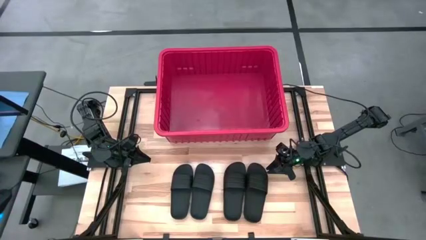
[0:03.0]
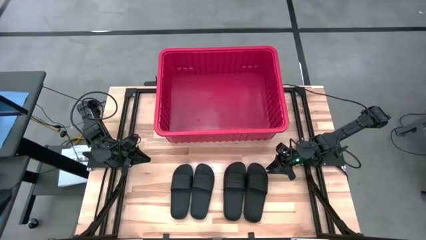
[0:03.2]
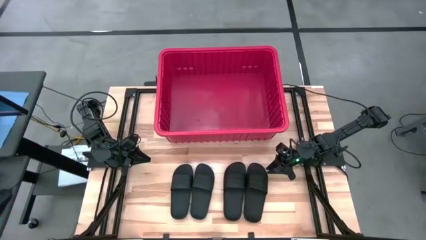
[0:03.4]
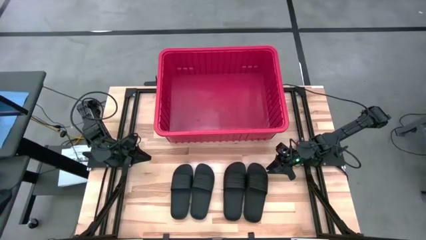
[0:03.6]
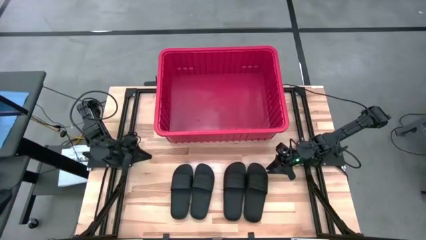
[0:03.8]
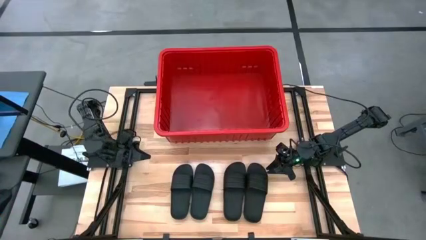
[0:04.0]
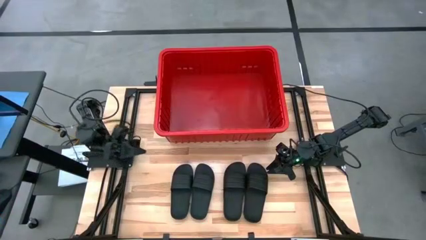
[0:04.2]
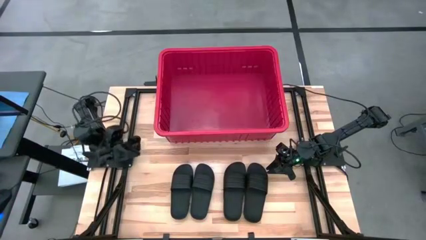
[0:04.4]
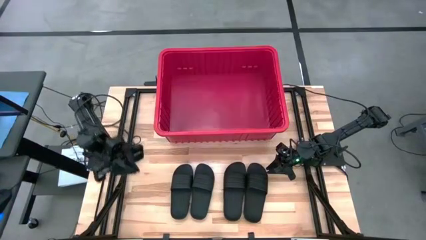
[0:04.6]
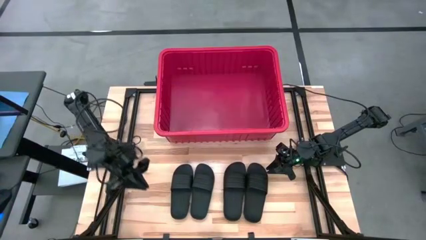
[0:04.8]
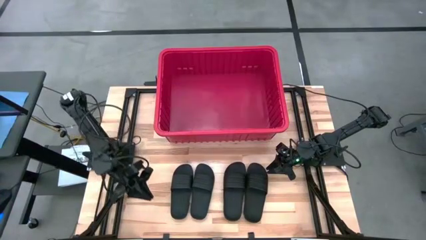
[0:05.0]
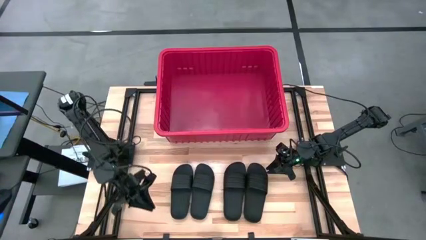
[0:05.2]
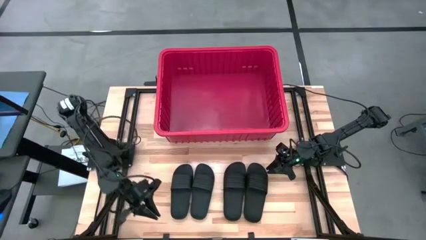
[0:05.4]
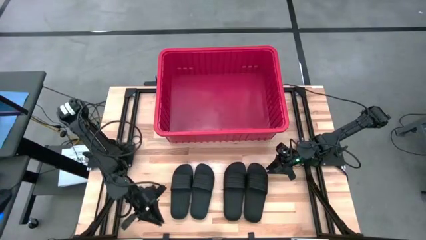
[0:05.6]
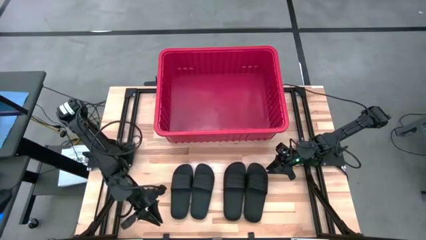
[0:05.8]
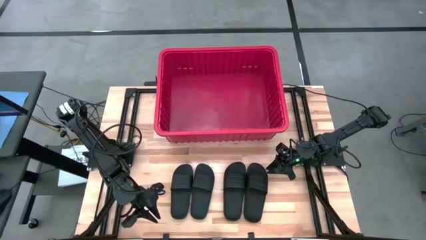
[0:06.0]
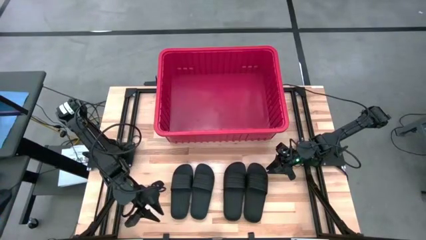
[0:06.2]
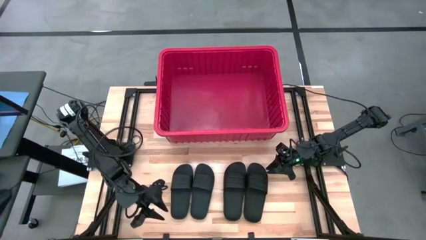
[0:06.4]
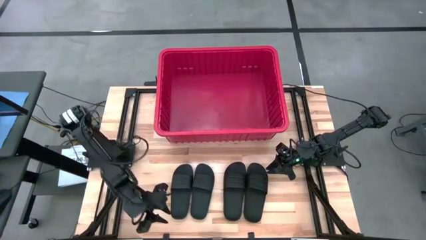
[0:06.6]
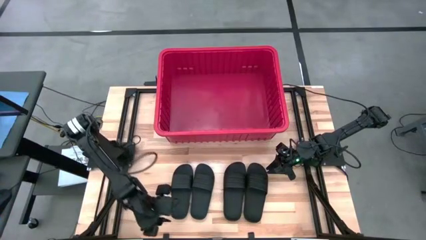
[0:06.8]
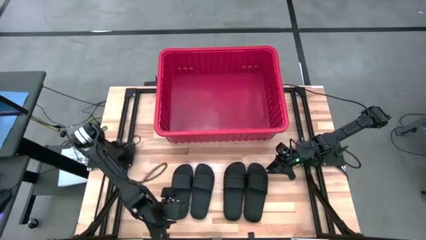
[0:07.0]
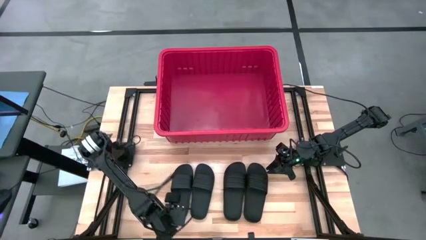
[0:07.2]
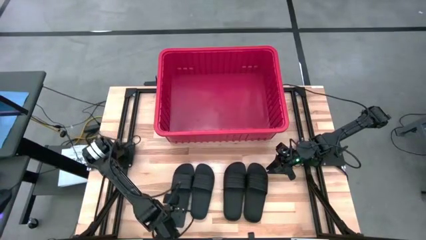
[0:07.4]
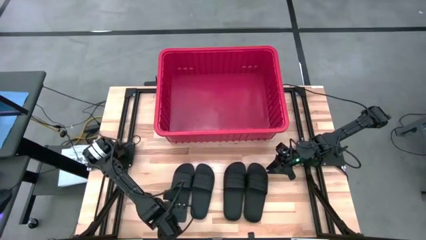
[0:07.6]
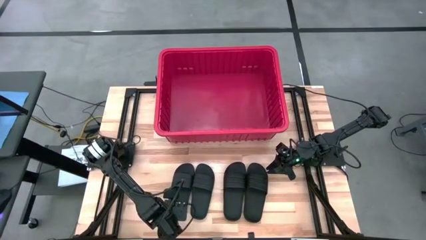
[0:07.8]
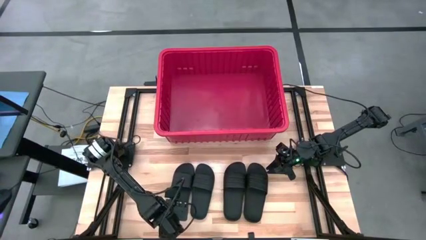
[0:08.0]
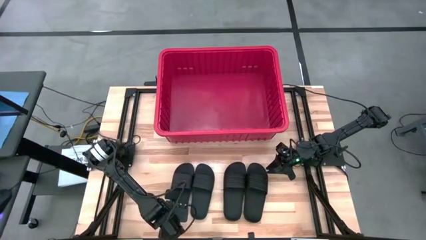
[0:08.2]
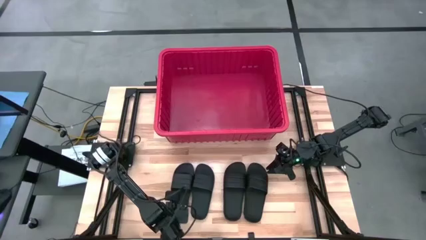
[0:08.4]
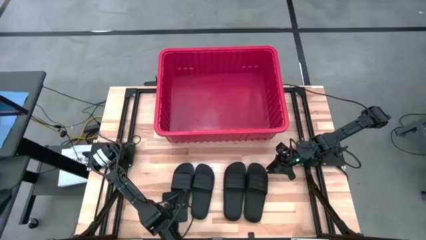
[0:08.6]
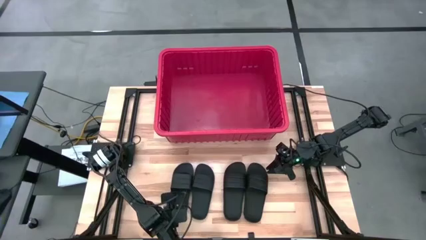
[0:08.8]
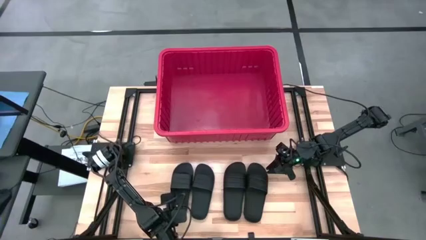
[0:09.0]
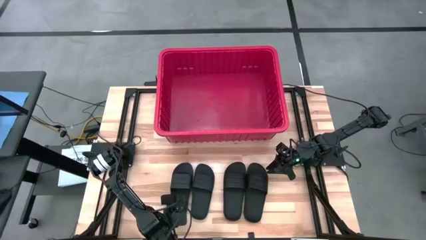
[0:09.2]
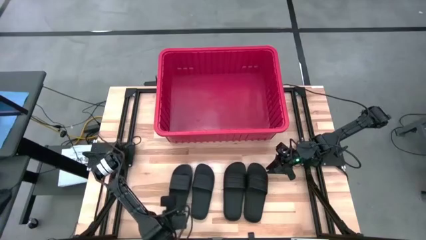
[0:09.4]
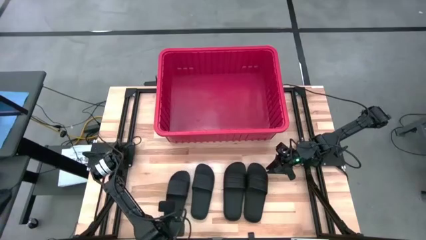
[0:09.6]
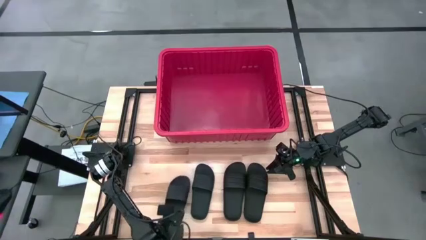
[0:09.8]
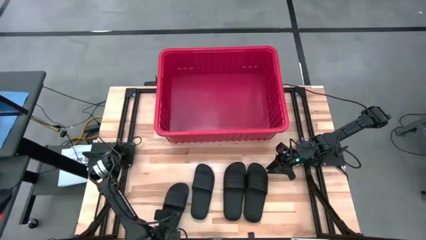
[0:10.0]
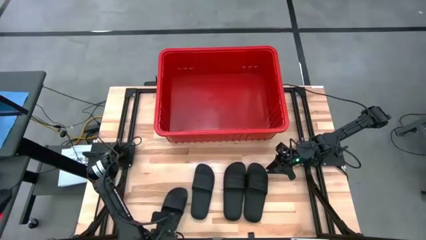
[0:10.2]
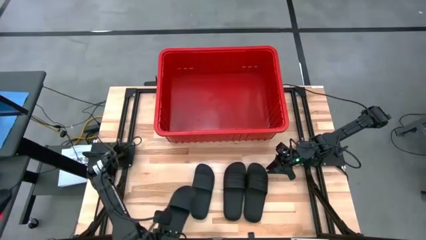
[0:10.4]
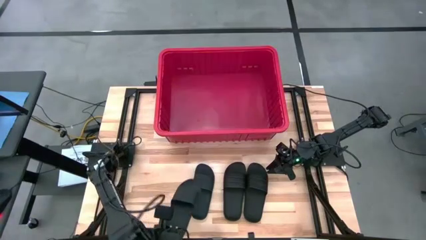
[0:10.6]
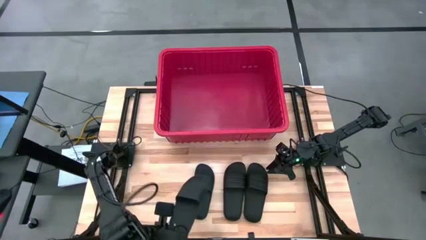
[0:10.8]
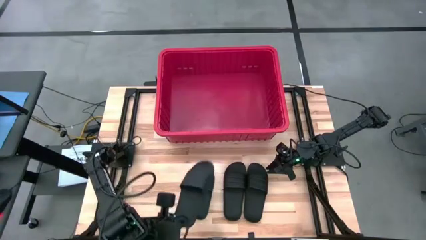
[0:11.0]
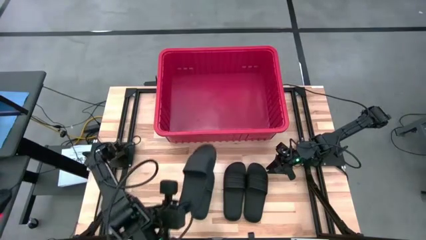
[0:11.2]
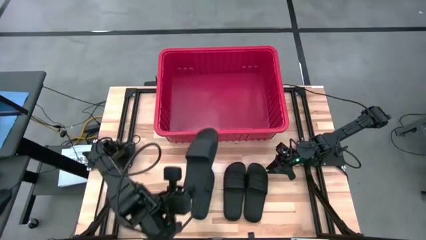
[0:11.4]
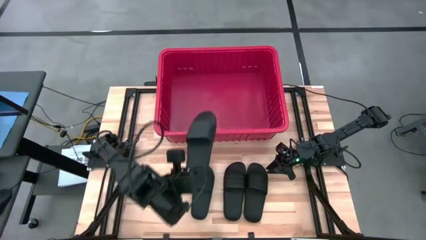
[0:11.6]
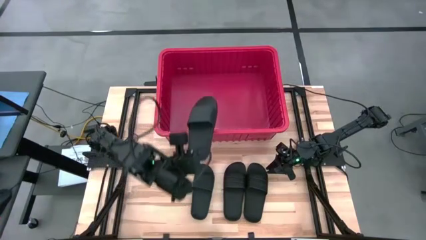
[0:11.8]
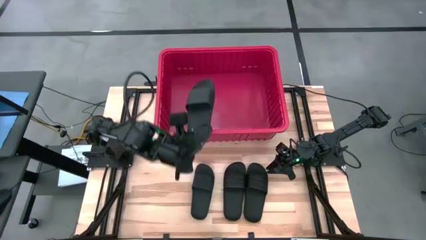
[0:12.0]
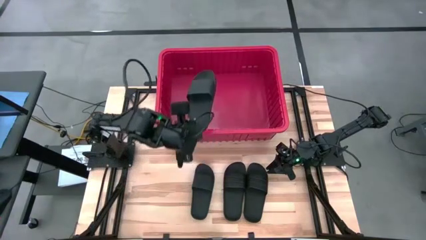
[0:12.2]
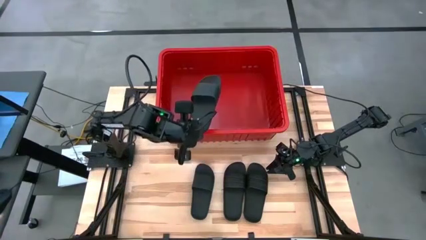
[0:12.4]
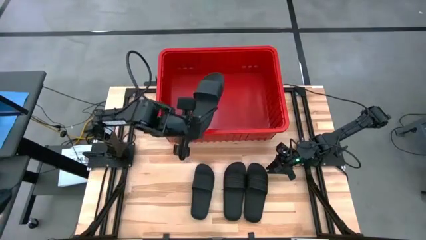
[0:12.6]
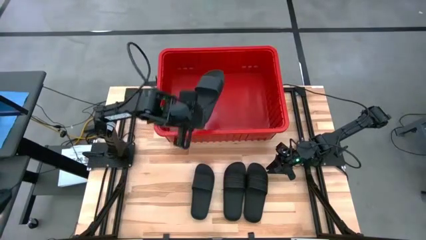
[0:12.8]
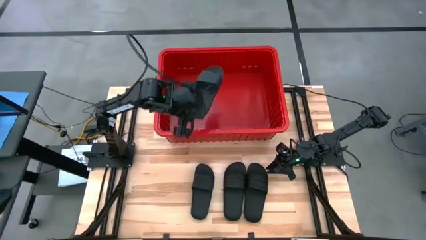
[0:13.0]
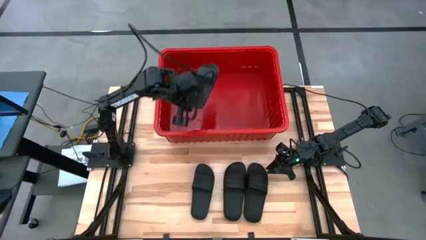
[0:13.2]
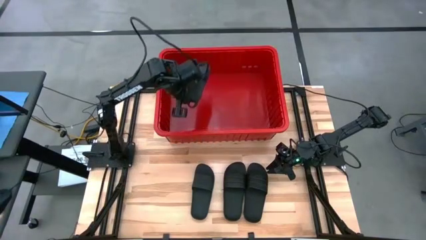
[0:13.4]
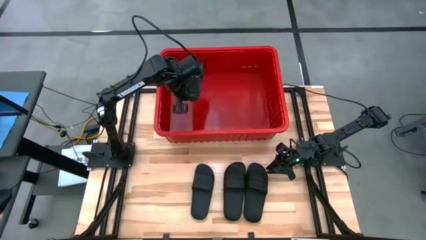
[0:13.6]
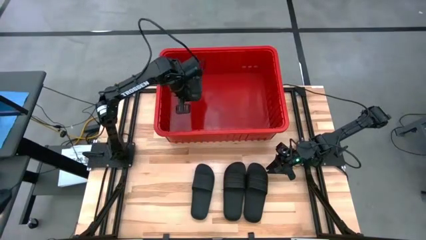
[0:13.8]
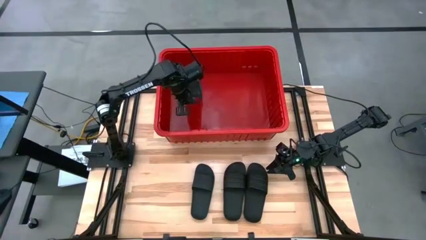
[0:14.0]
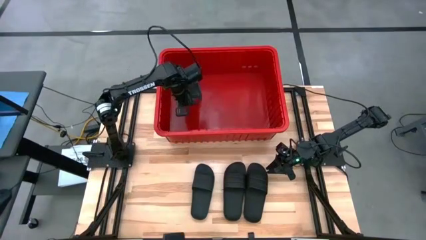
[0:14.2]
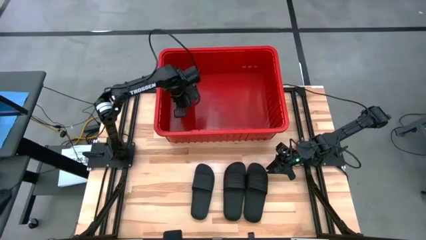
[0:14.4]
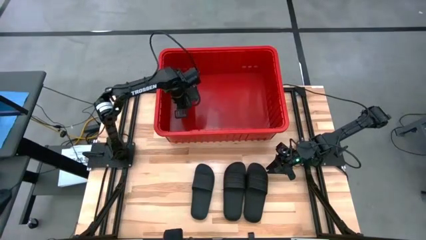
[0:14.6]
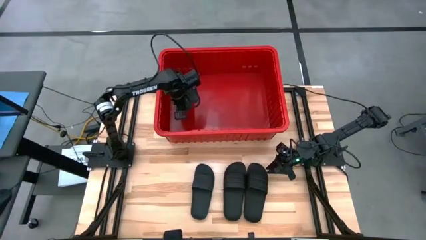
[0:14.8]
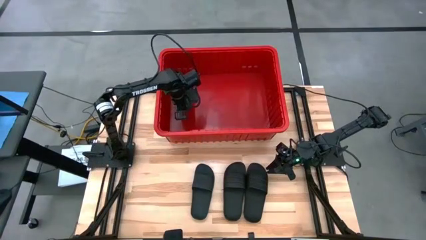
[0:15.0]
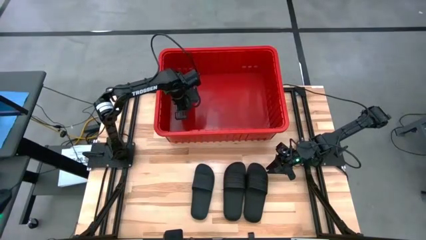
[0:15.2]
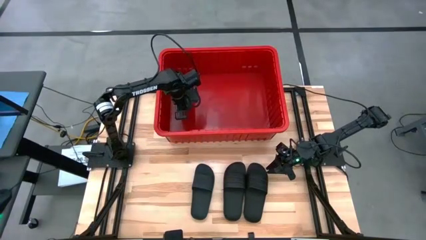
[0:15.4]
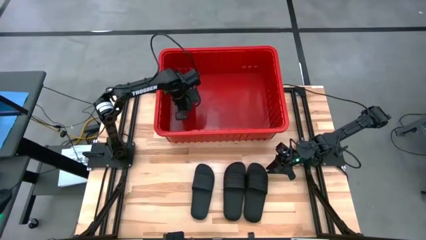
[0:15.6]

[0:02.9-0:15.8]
Task: Pick and place slides into bin
Put the black slides into the red box

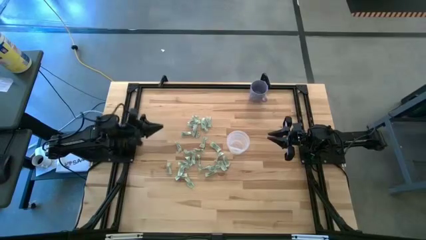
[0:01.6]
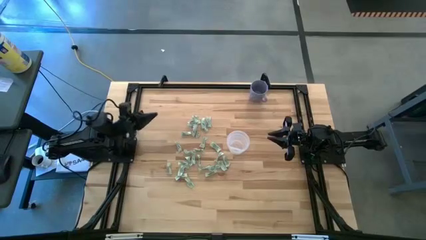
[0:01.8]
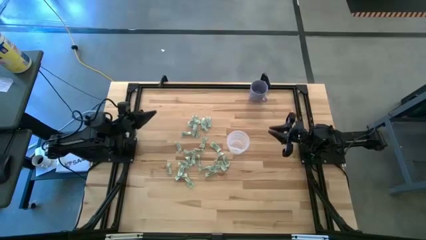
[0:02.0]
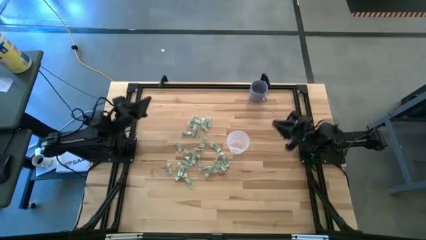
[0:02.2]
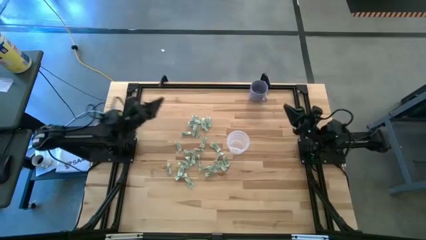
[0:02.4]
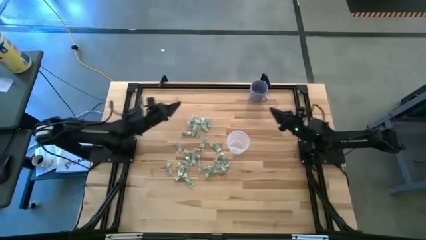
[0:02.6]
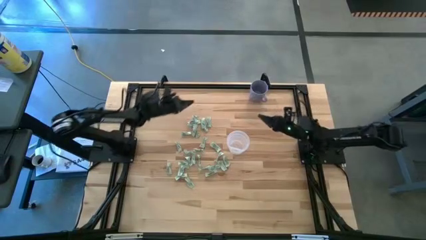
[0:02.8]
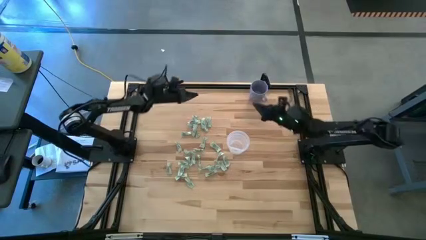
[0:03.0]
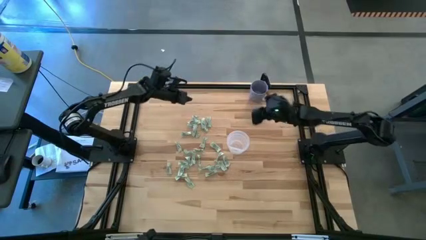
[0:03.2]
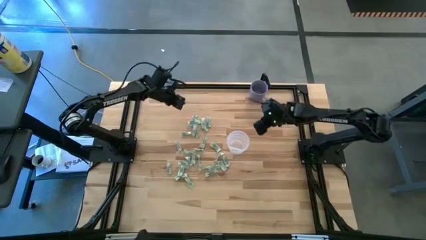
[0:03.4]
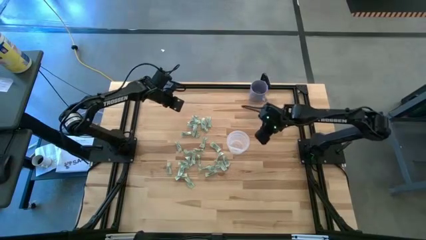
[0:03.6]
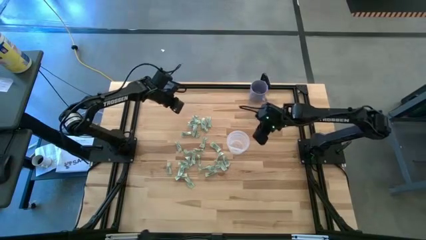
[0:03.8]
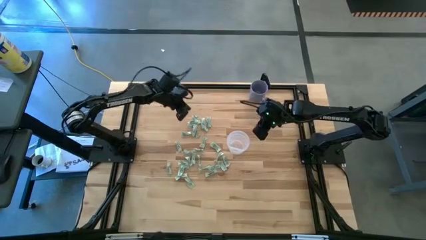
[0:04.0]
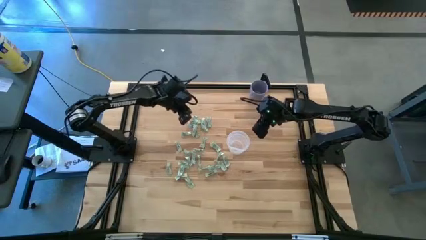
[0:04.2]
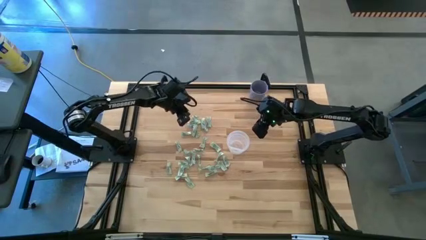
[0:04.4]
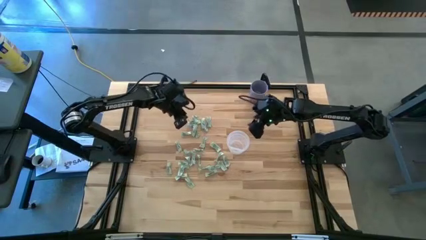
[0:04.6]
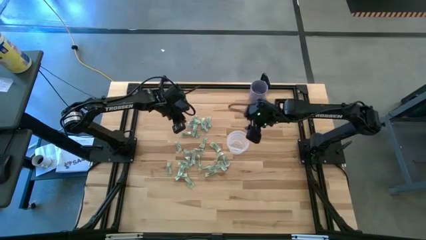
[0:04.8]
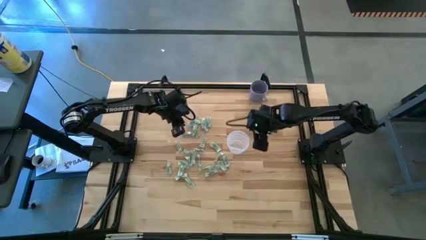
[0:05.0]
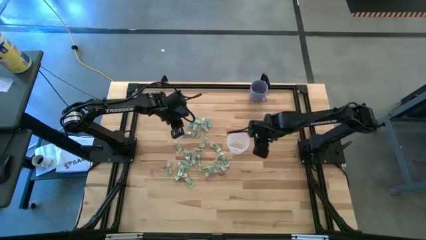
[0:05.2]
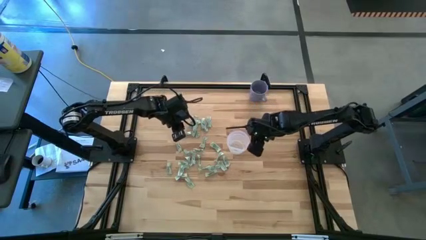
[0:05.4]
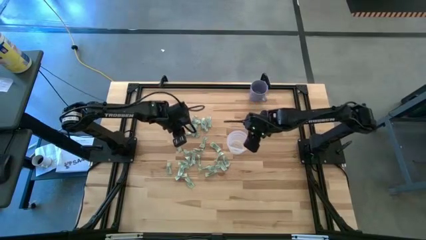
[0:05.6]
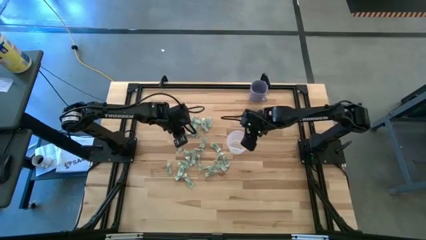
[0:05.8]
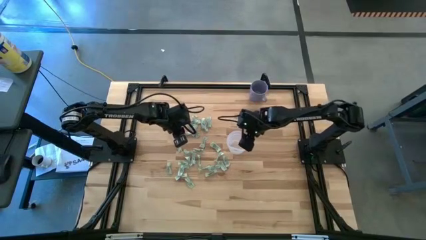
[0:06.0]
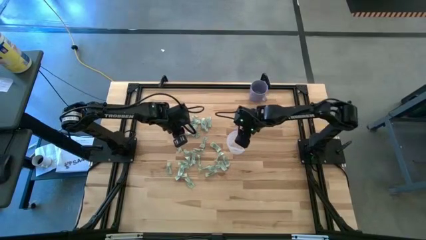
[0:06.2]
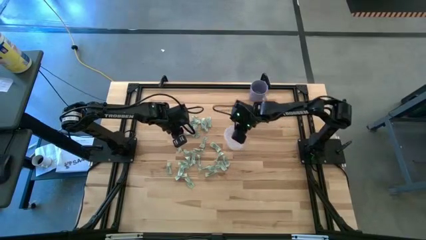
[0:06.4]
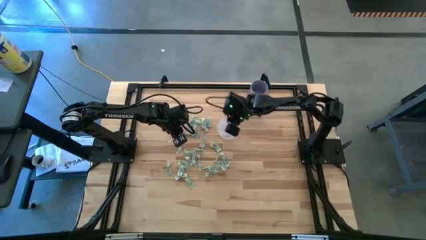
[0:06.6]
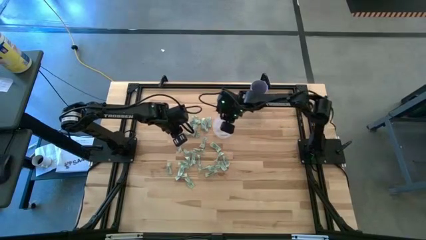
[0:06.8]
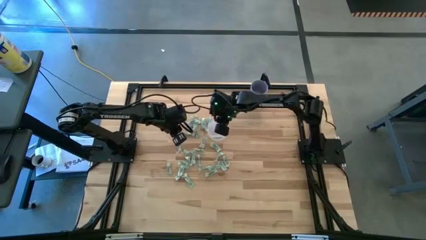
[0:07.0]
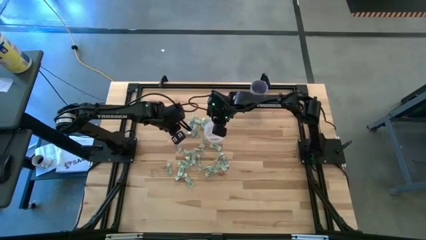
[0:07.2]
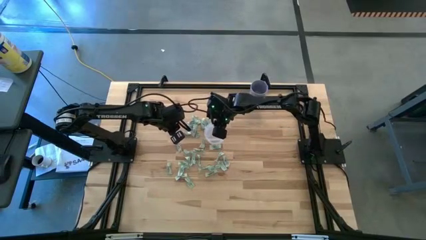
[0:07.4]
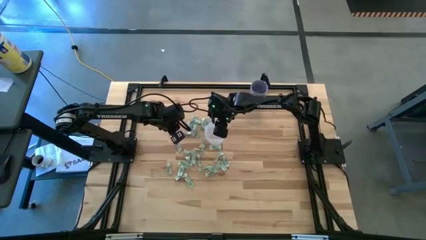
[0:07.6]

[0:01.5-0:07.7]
Task: Pick and place Stevia / Truvia into bins
Adjust the transparent container
